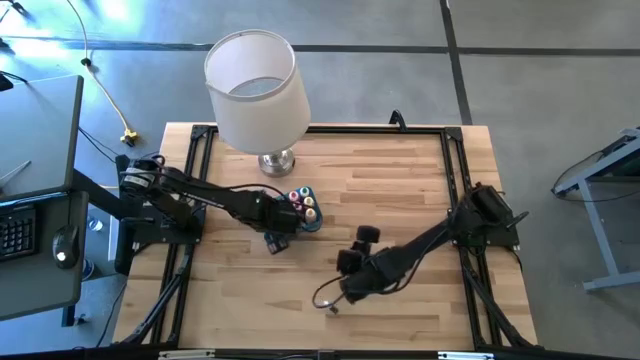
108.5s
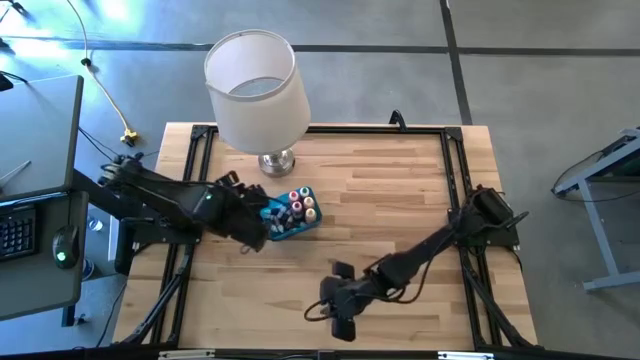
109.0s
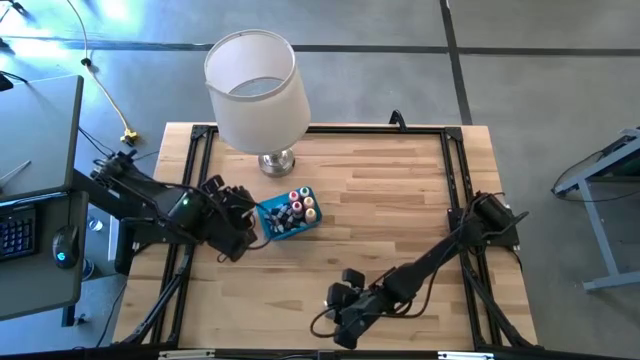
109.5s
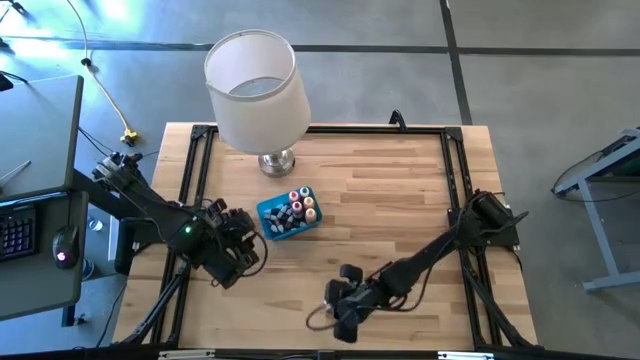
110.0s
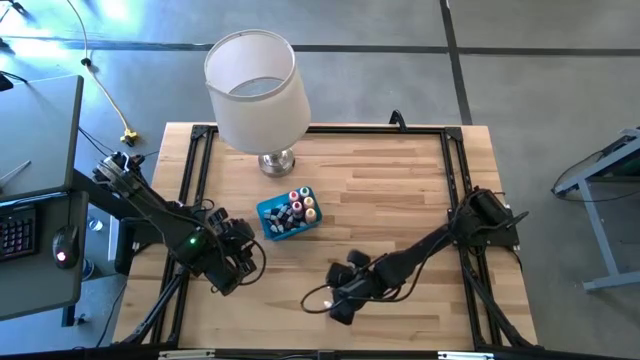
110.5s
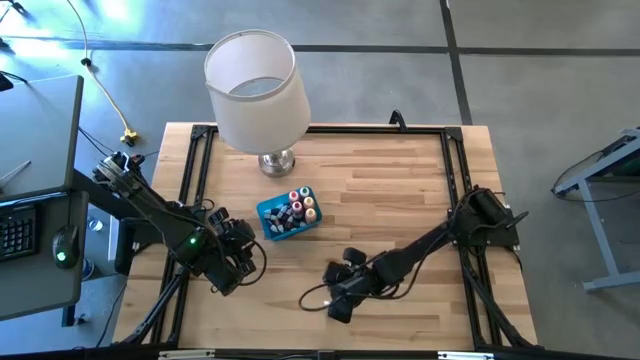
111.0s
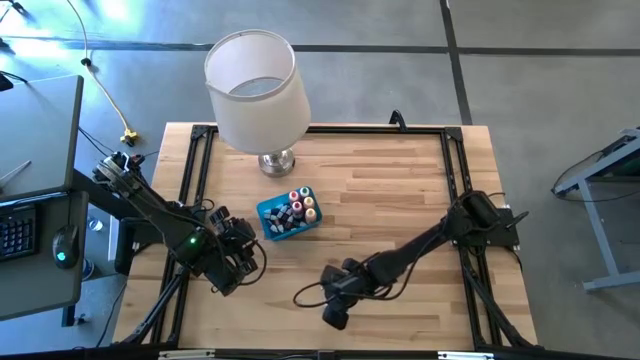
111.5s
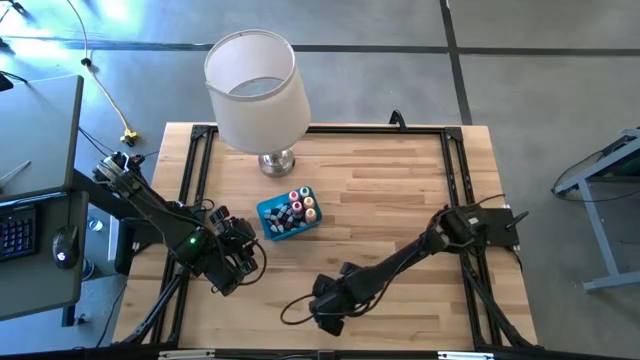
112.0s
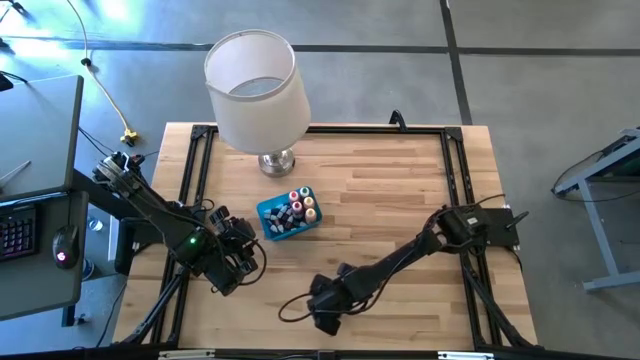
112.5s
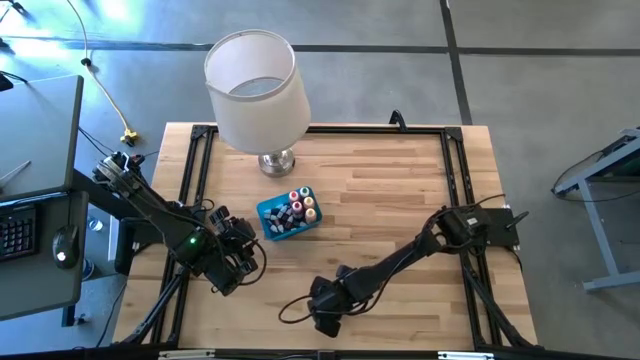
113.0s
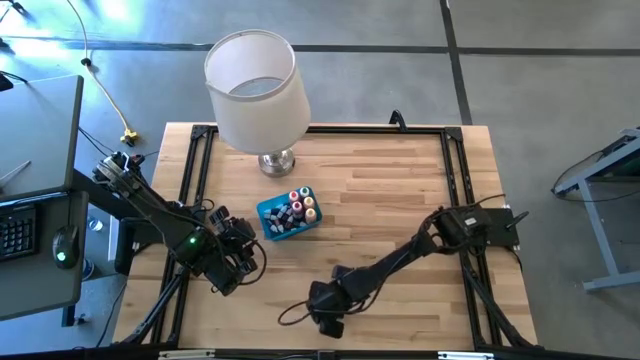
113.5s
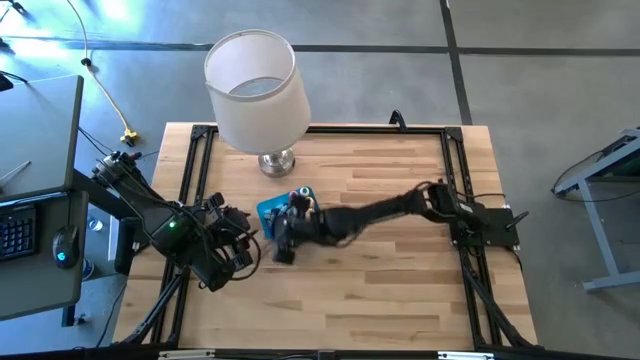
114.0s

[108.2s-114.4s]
Task: Pick & Place food coloring
Put the small black food coloring bottle into the blue bin

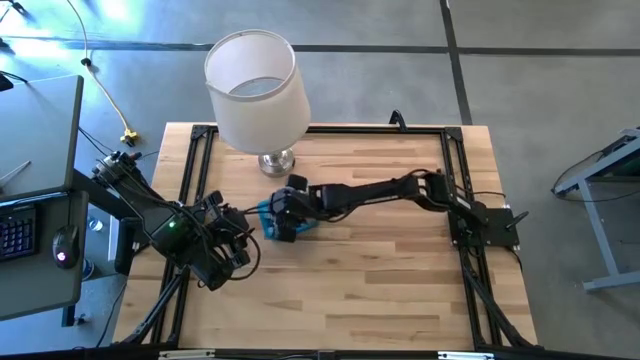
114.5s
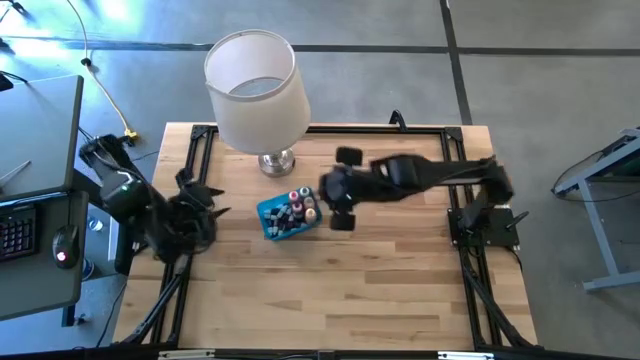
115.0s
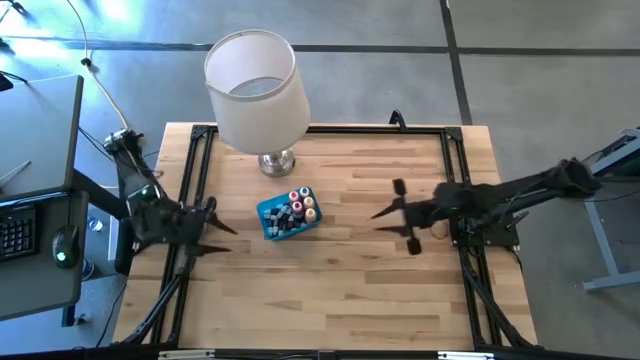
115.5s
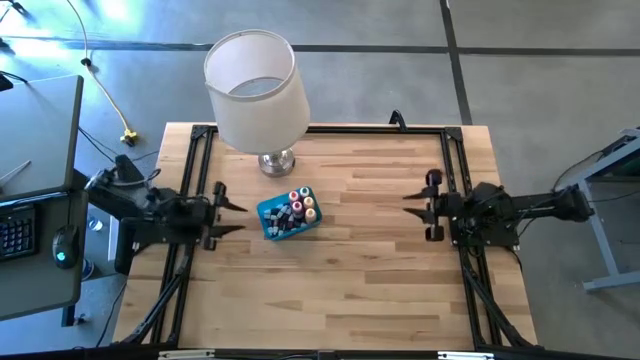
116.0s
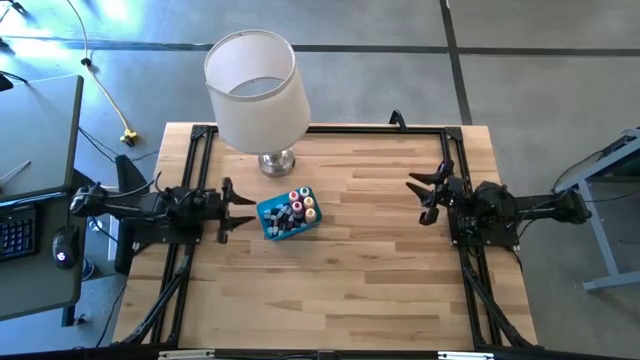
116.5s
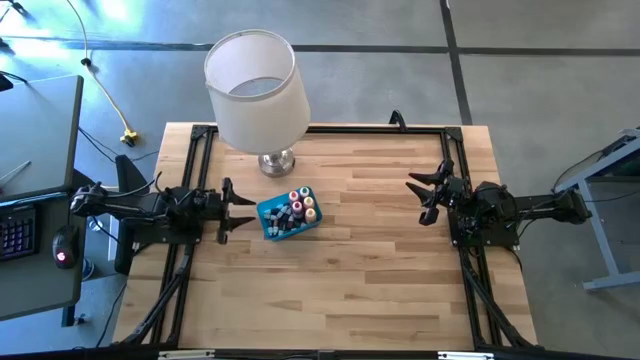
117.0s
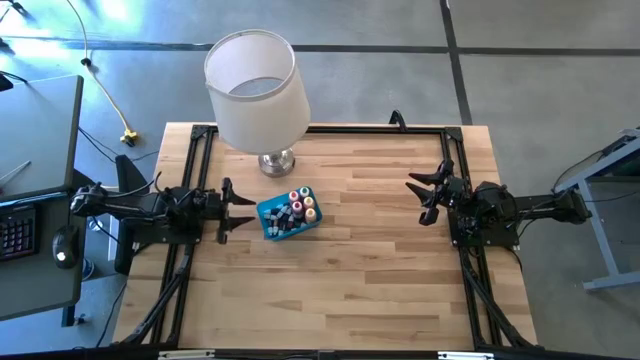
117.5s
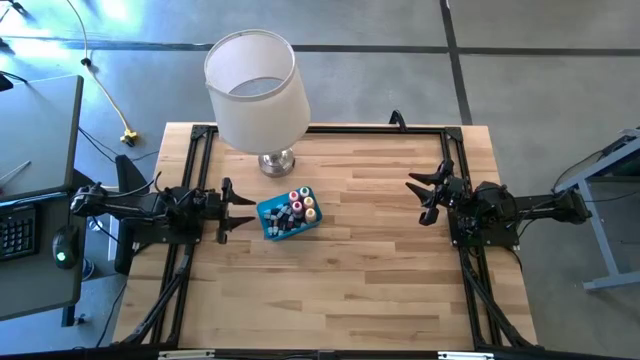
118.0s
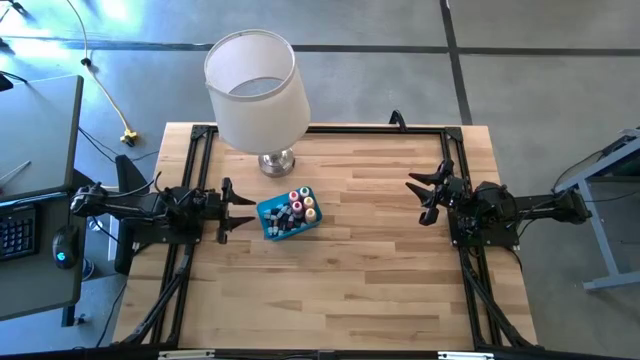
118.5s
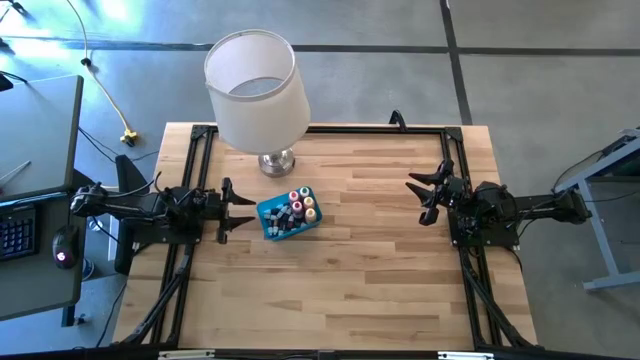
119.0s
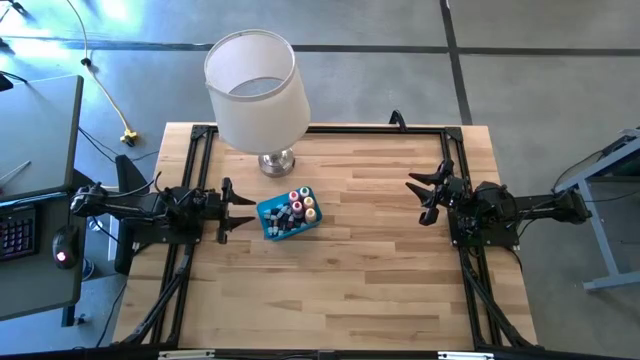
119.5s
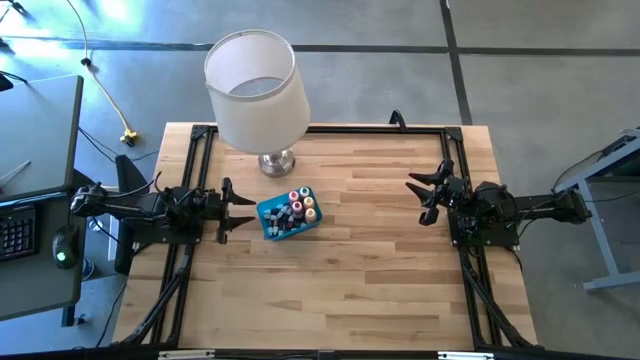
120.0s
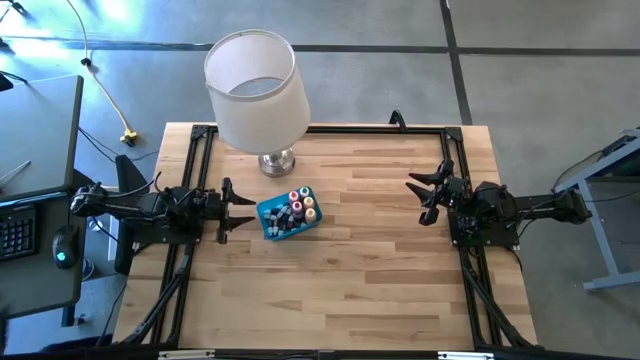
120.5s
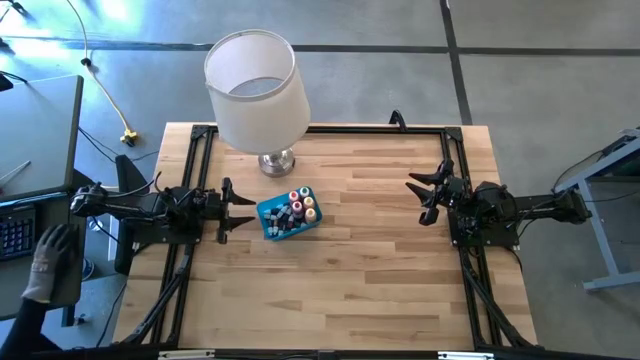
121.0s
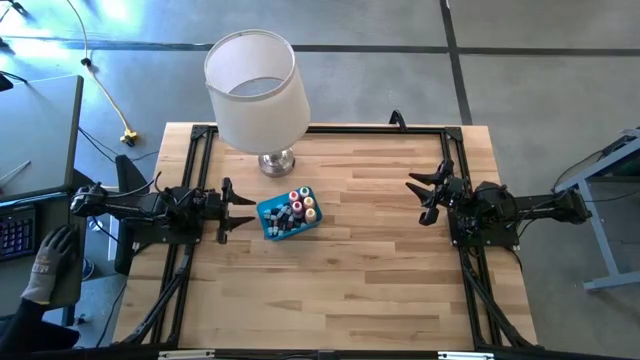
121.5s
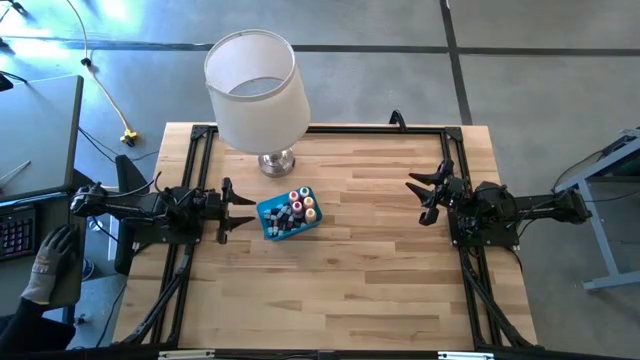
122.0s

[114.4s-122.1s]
Return to Home Position

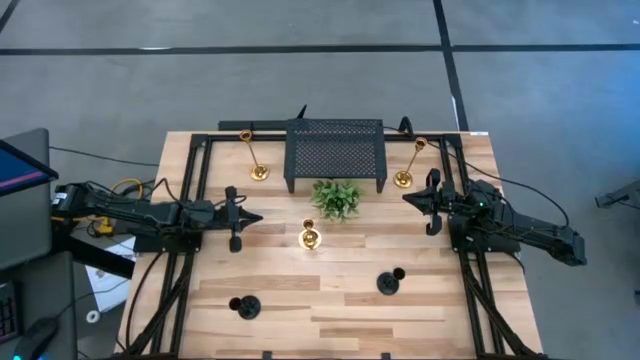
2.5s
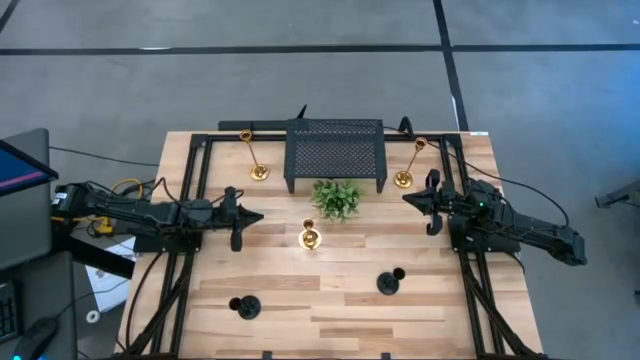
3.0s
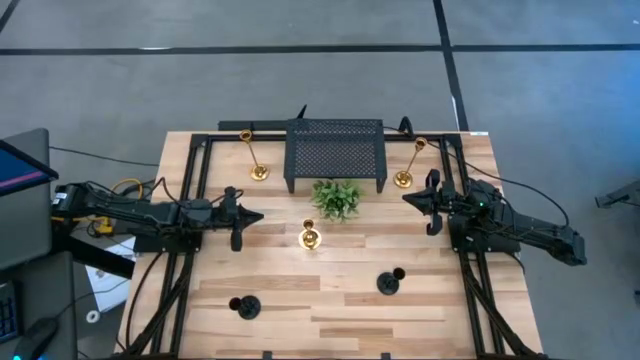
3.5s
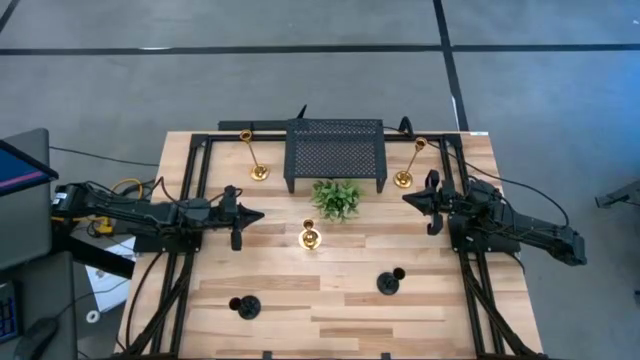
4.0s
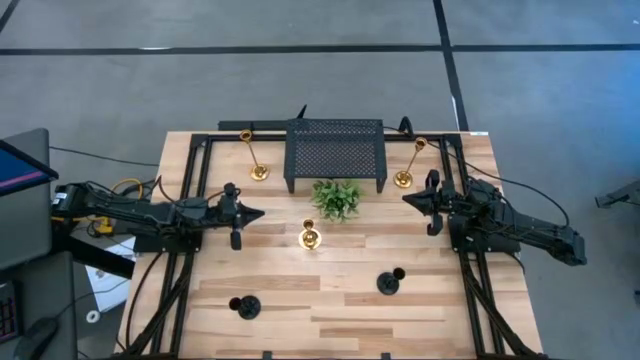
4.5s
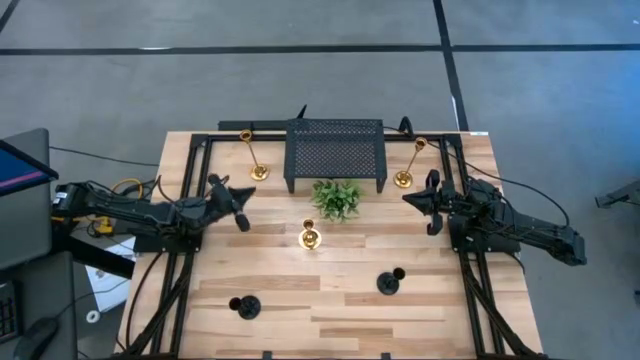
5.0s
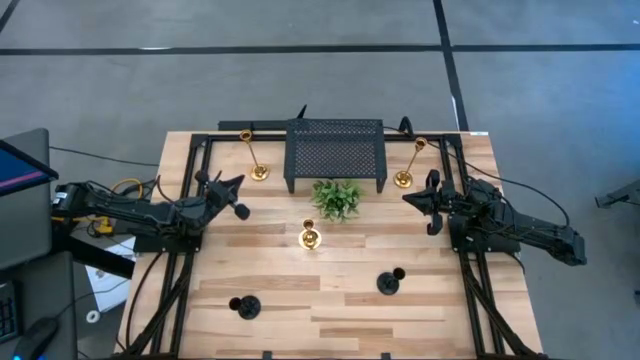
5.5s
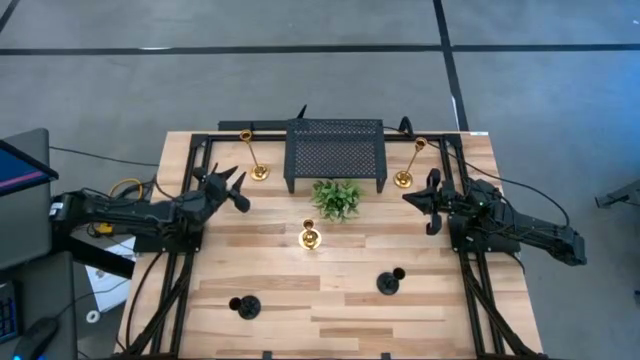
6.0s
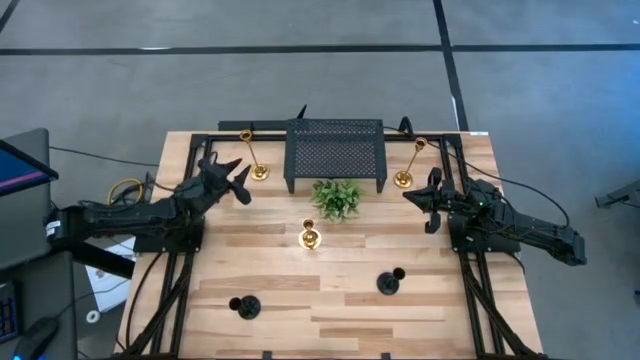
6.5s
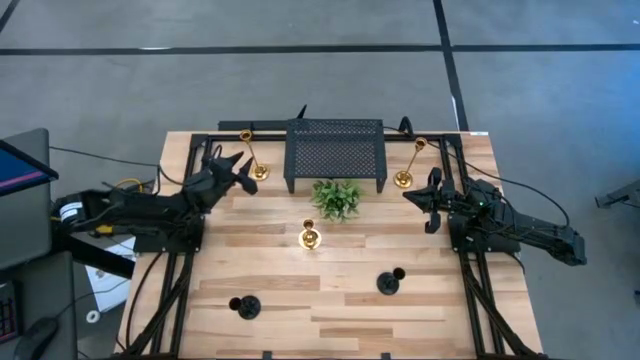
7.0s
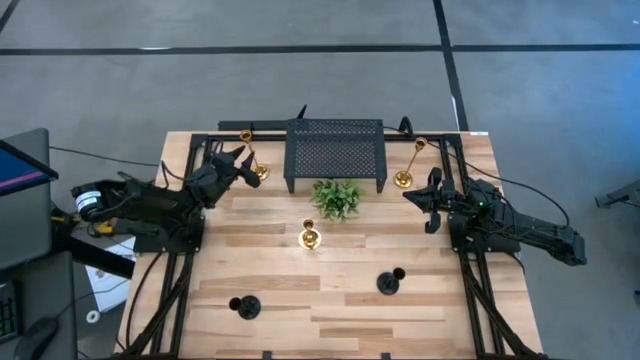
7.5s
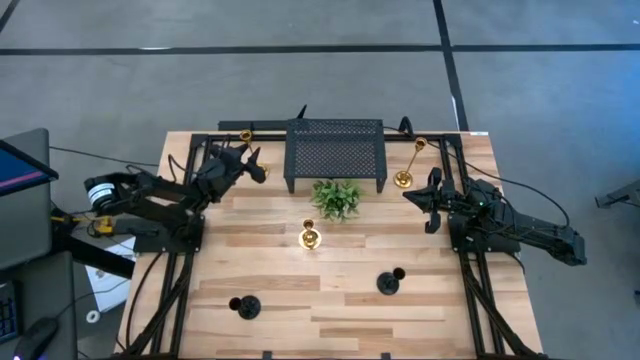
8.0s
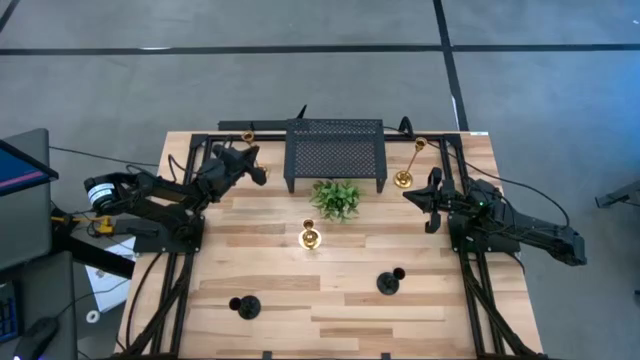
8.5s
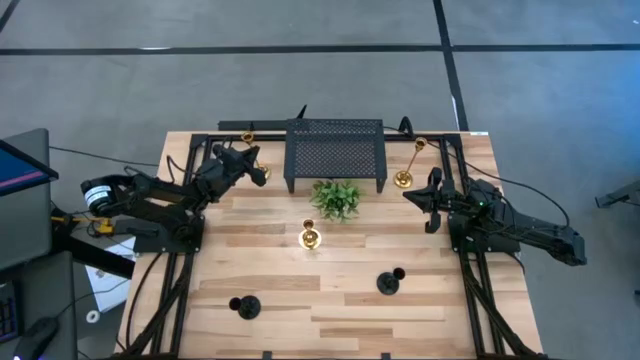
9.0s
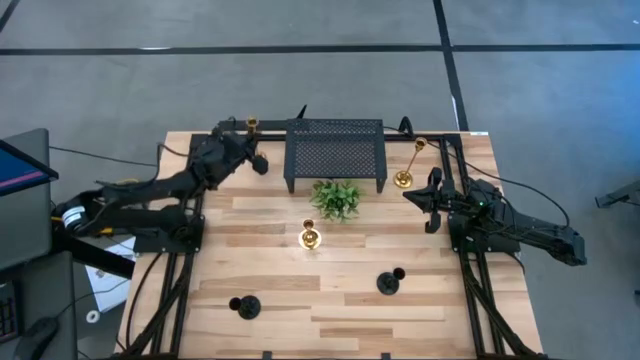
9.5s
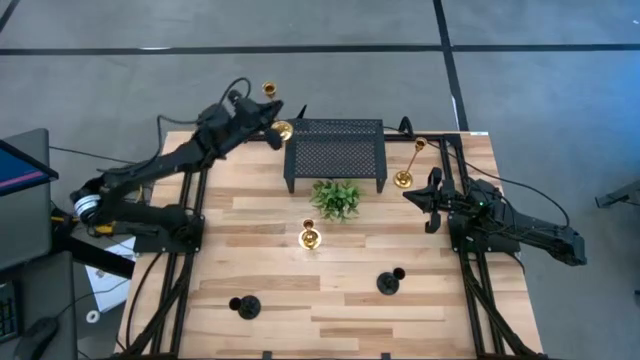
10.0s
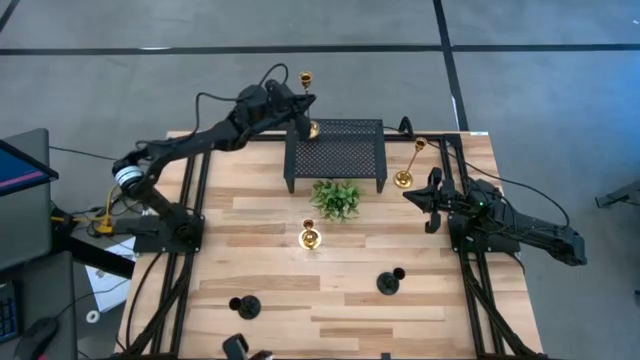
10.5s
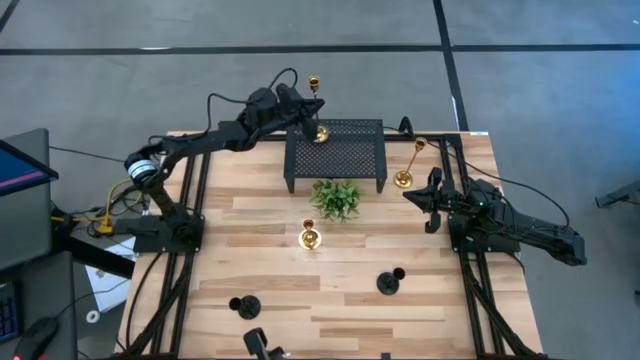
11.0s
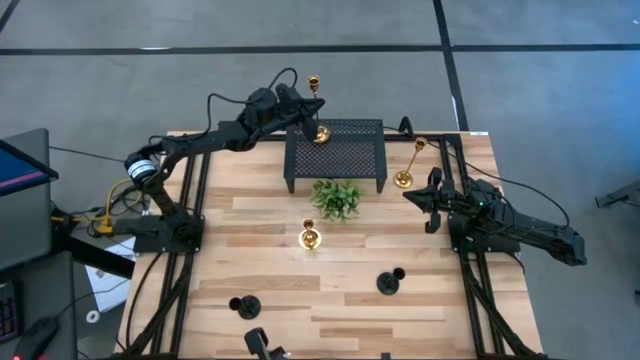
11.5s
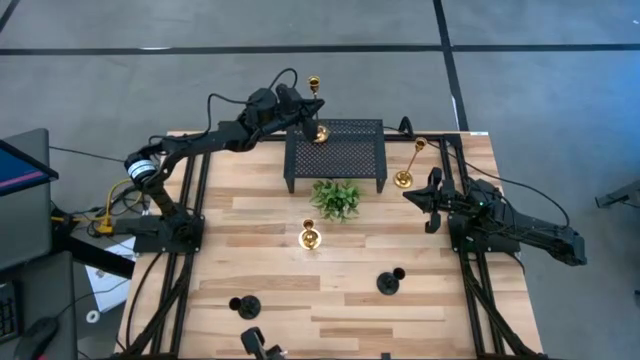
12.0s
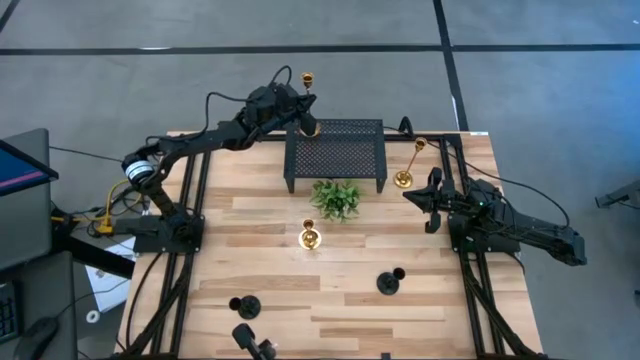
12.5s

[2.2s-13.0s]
Task: Pick & Place candle stick holders
Put the top left gold candle holder on the shelf
